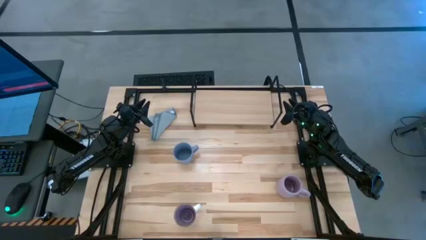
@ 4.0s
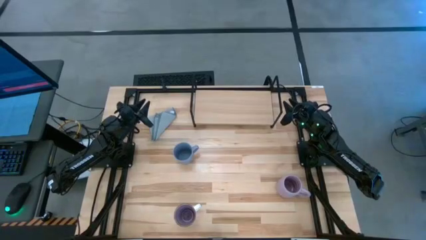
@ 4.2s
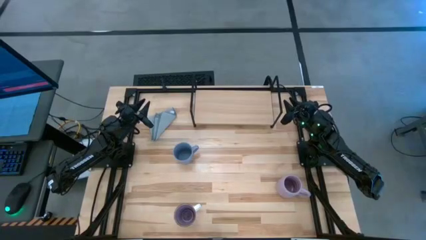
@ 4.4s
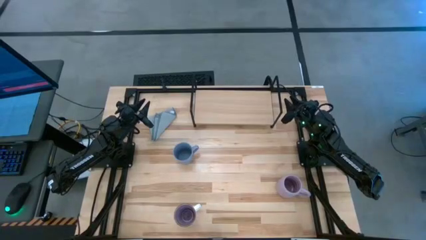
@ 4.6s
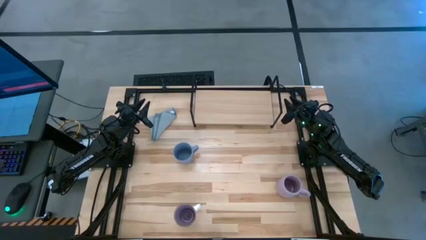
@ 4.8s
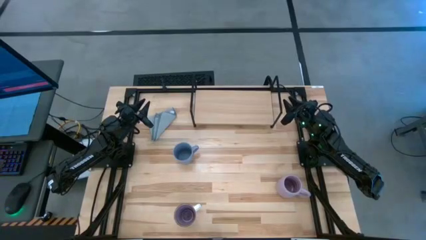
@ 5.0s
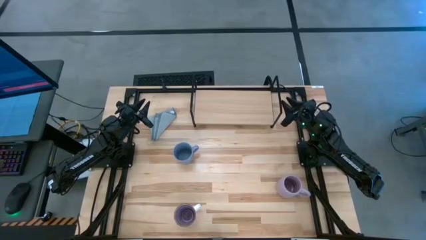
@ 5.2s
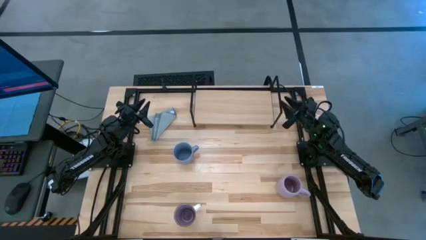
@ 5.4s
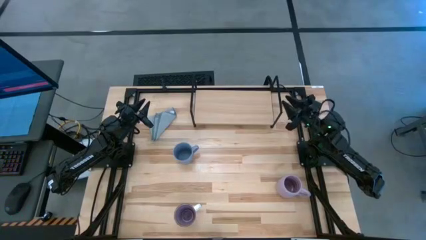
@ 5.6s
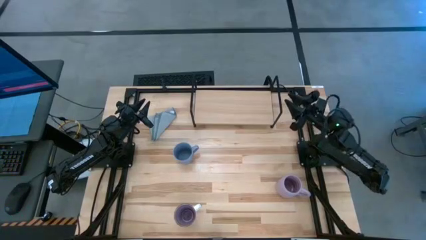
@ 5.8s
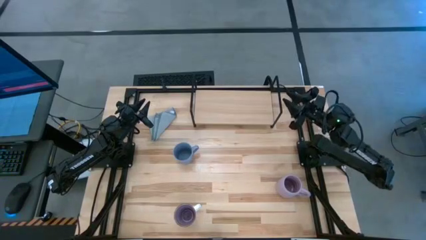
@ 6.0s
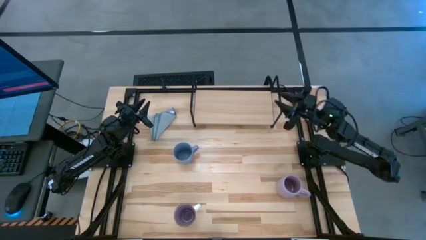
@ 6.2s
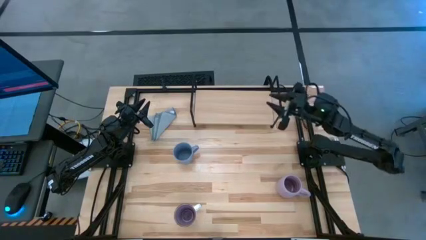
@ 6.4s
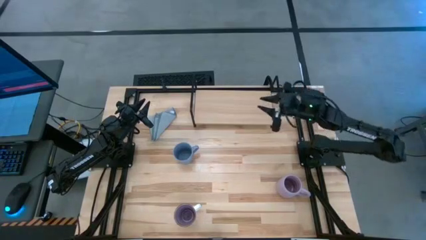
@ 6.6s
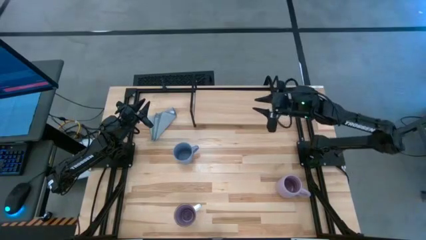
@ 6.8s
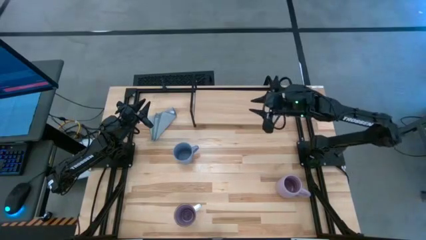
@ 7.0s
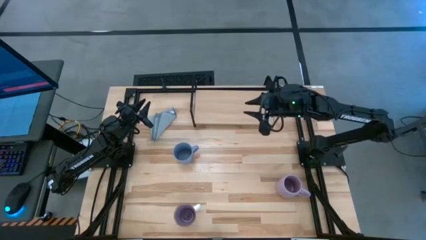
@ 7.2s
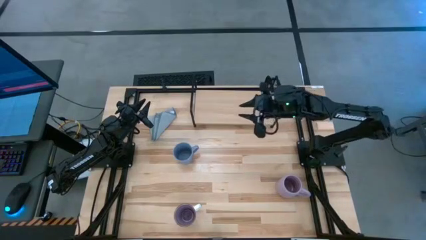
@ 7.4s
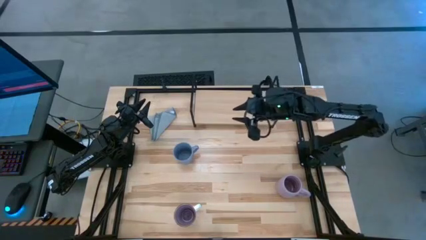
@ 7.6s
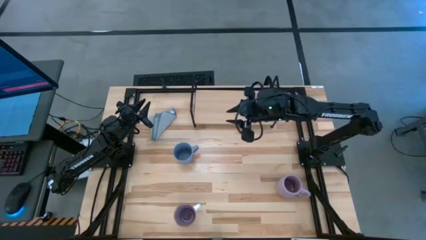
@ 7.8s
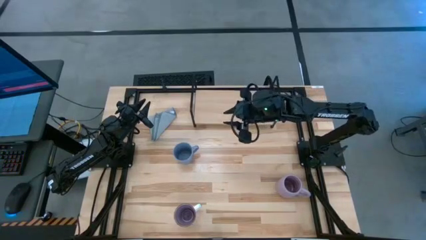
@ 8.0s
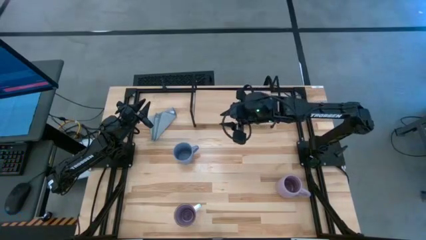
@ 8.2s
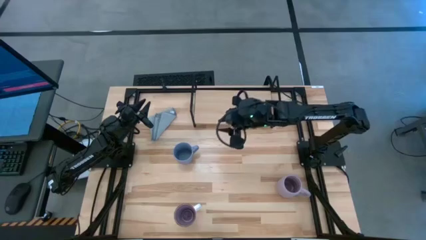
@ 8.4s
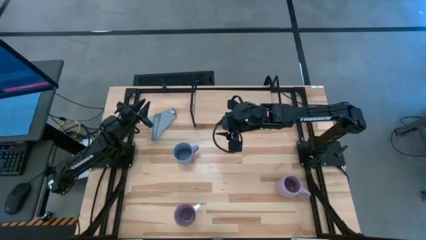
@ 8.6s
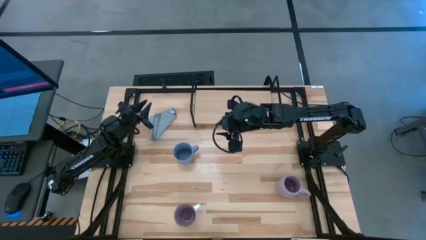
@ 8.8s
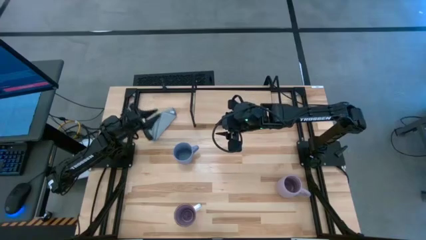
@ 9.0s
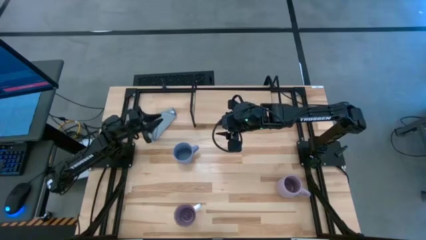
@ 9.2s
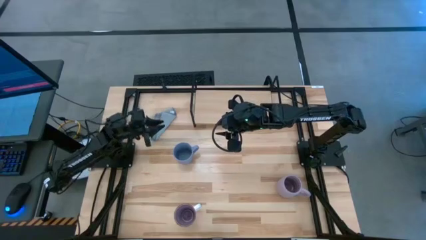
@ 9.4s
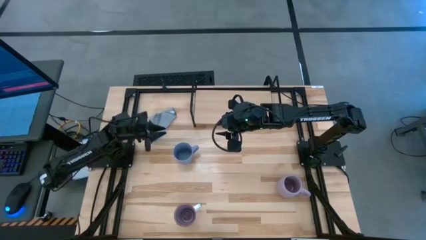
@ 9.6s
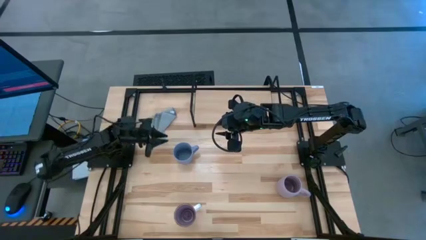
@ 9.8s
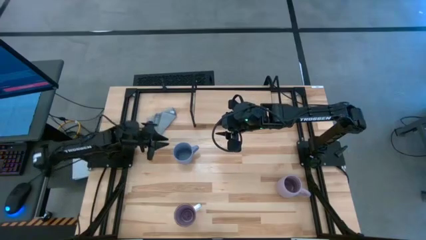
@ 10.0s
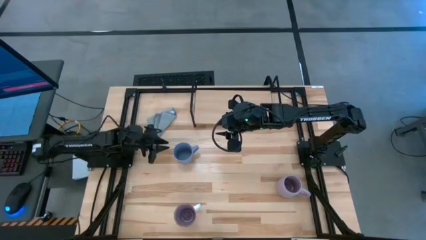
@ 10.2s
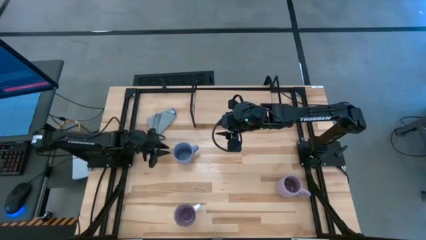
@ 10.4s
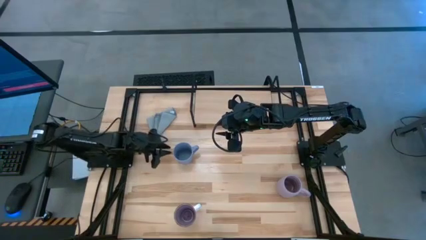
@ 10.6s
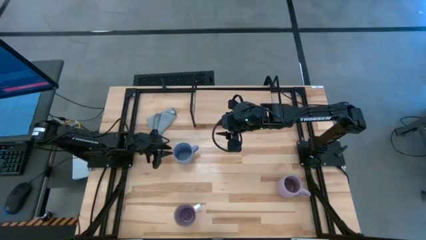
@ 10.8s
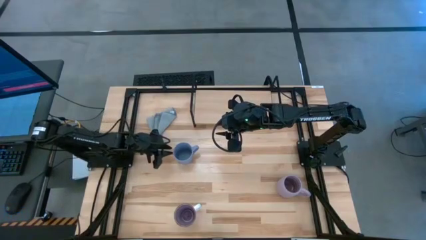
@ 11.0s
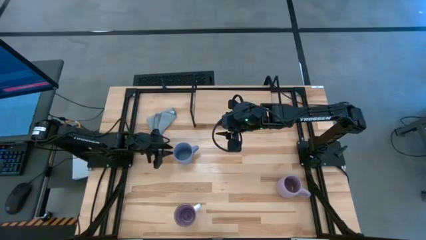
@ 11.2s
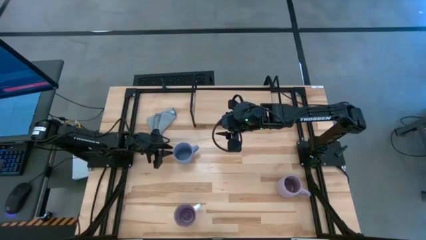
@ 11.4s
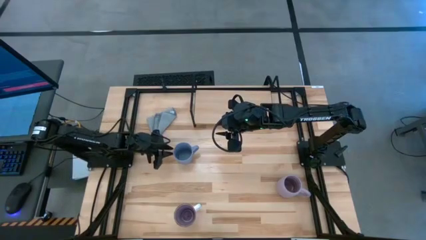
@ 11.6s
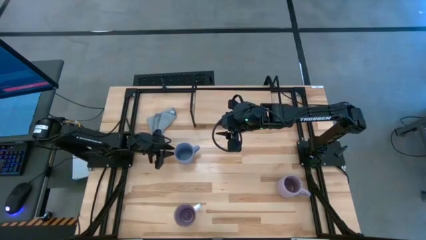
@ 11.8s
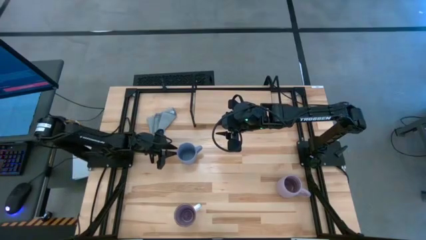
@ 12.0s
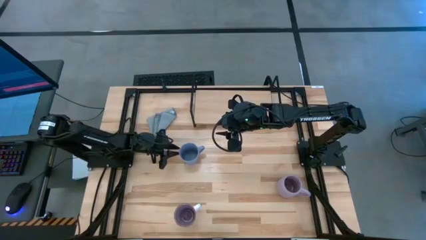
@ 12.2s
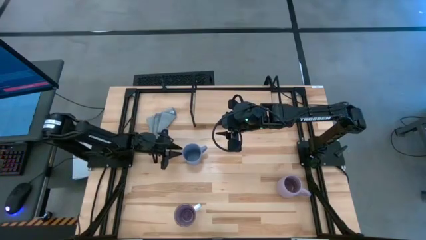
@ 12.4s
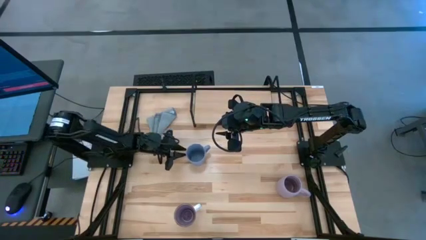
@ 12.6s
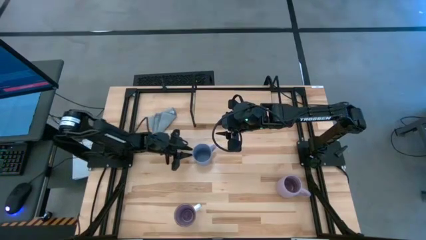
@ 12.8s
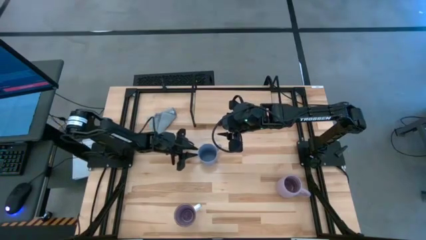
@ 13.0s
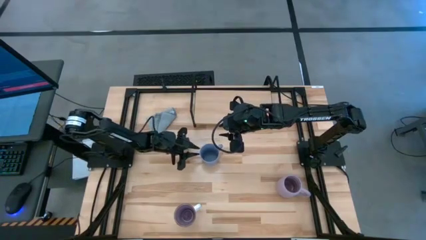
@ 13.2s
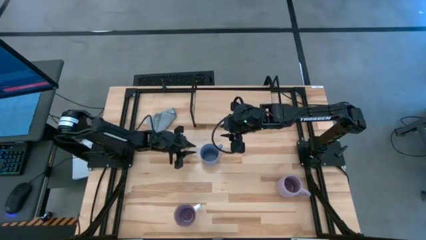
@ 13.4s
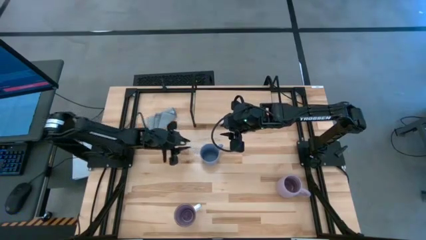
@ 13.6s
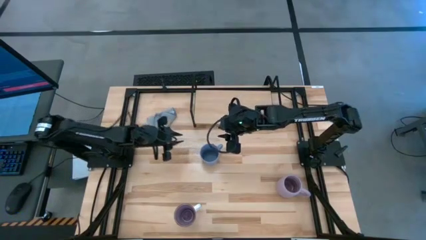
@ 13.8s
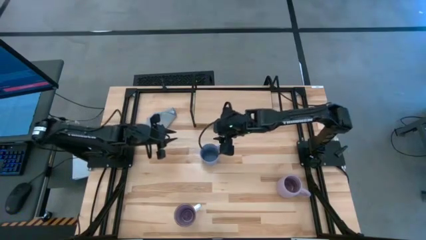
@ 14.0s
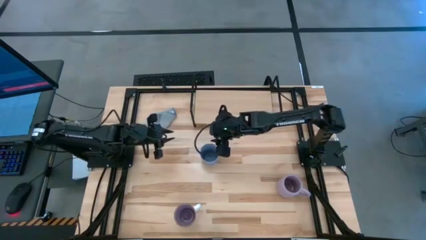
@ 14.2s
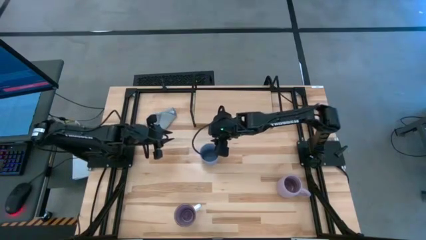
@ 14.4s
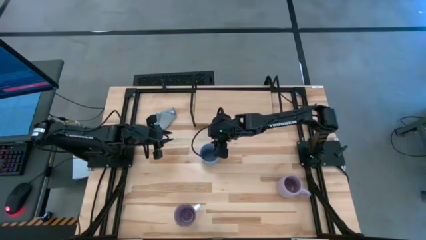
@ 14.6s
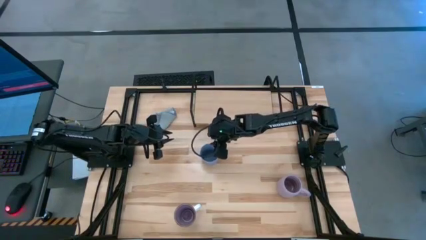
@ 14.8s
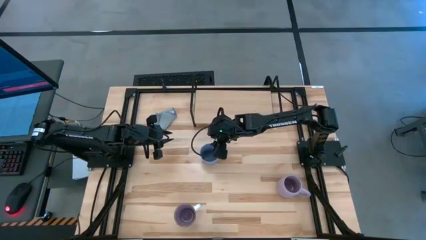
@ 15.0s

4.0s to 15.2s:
Task: Stack small to large cups/mugs on shelf
Put the blue cup on the shelf

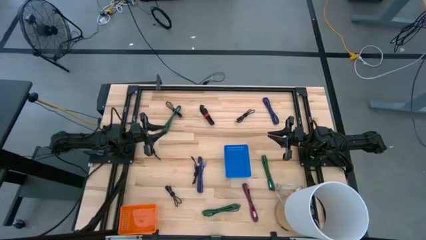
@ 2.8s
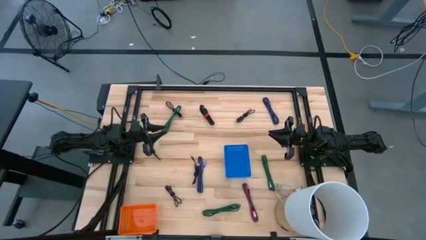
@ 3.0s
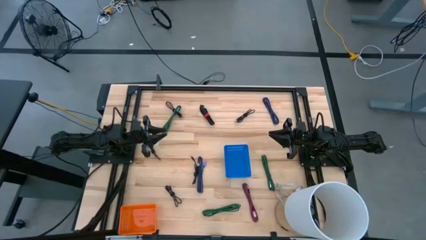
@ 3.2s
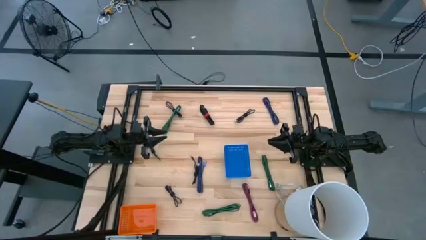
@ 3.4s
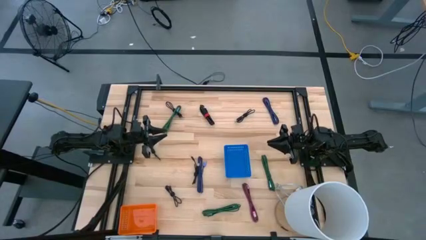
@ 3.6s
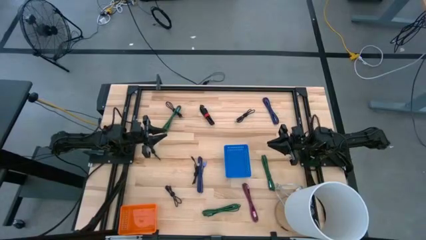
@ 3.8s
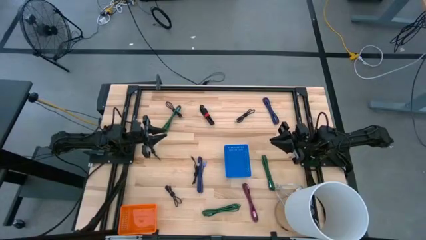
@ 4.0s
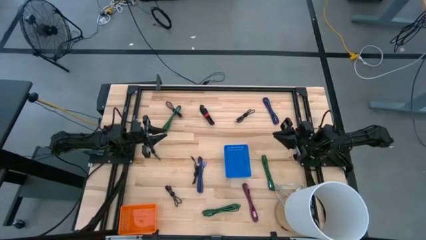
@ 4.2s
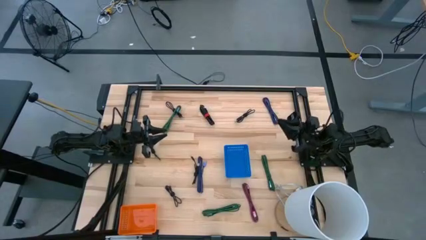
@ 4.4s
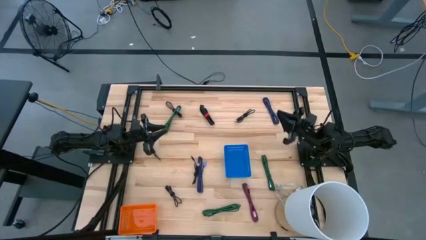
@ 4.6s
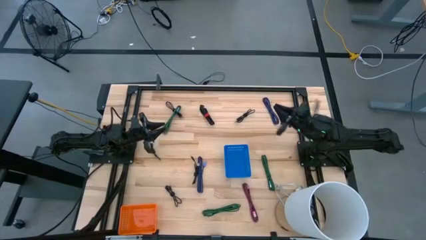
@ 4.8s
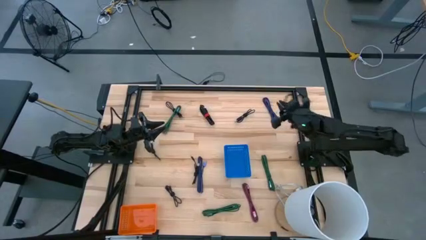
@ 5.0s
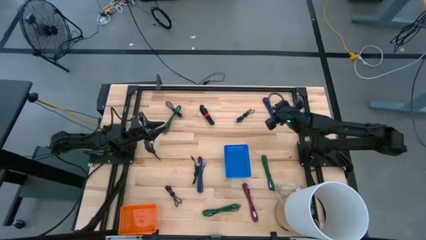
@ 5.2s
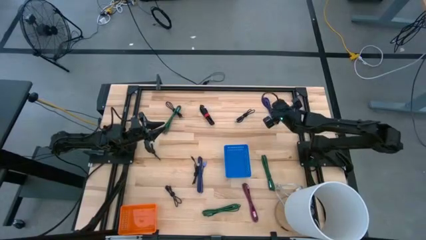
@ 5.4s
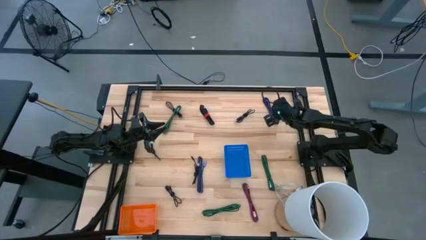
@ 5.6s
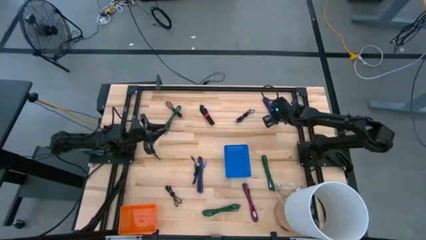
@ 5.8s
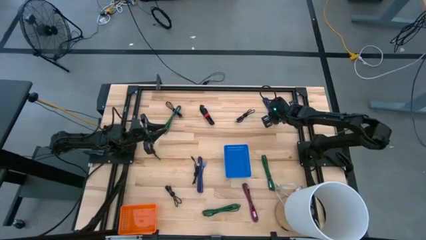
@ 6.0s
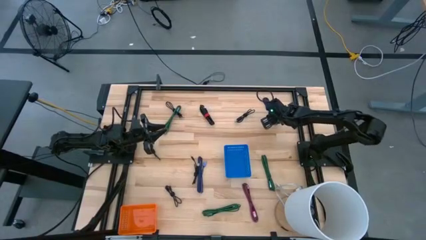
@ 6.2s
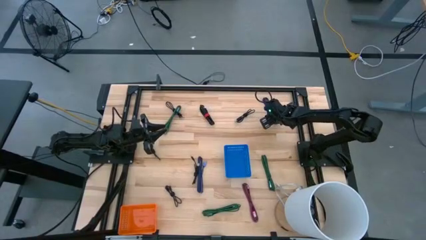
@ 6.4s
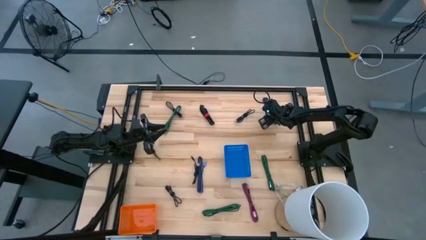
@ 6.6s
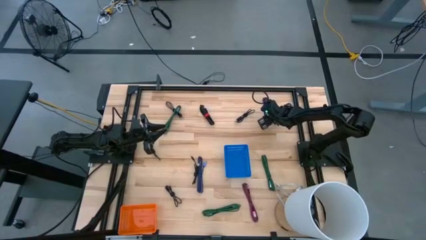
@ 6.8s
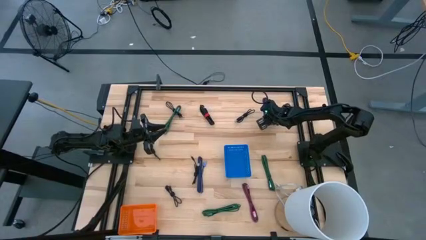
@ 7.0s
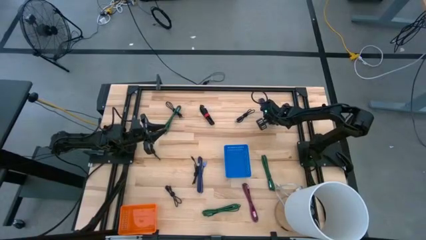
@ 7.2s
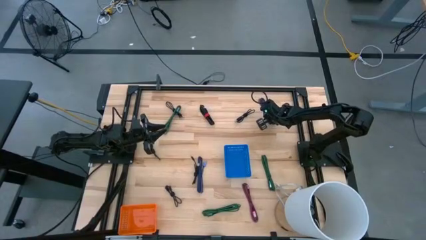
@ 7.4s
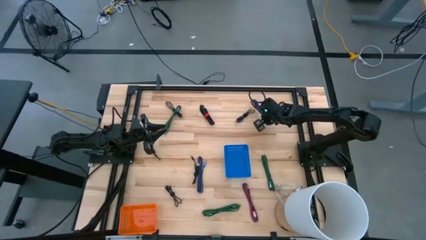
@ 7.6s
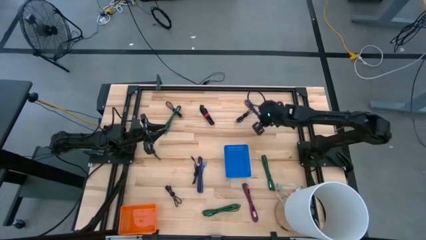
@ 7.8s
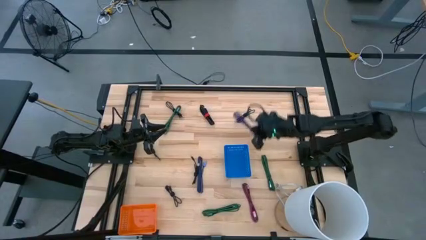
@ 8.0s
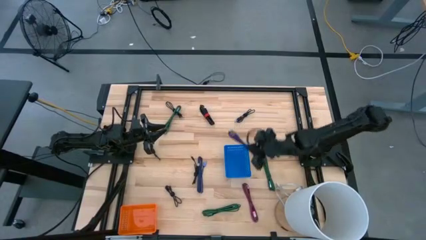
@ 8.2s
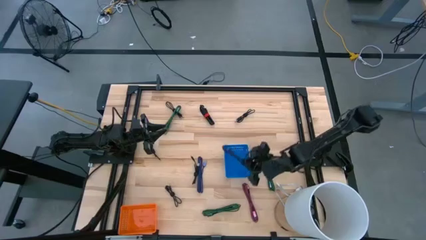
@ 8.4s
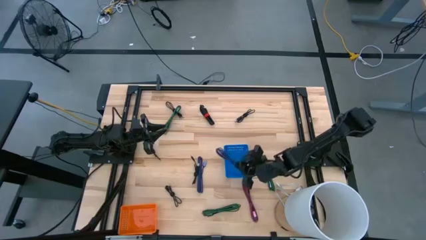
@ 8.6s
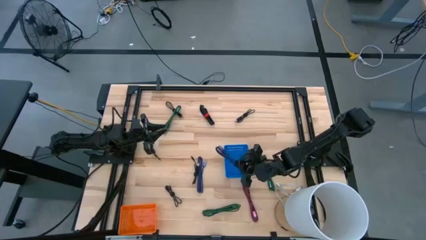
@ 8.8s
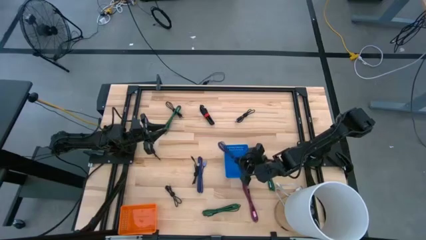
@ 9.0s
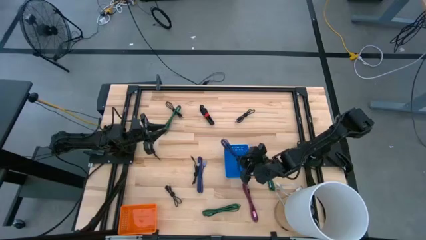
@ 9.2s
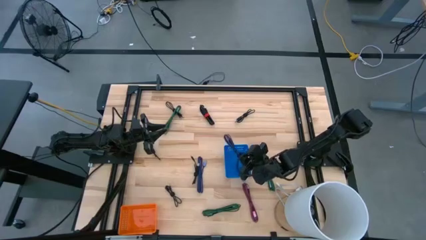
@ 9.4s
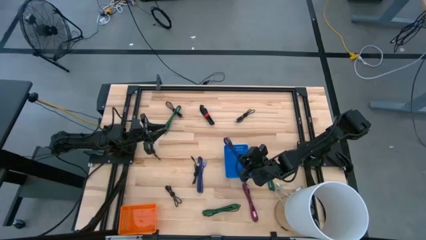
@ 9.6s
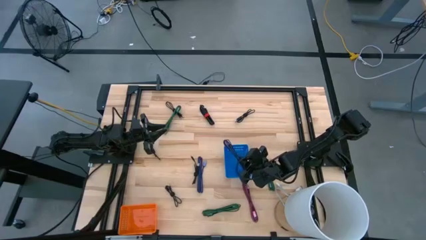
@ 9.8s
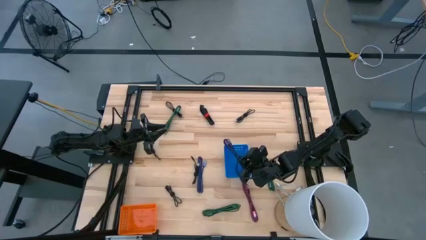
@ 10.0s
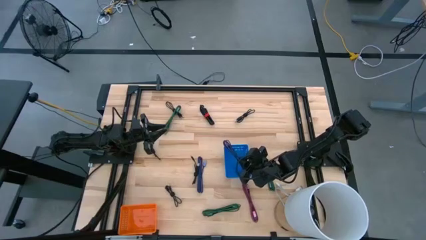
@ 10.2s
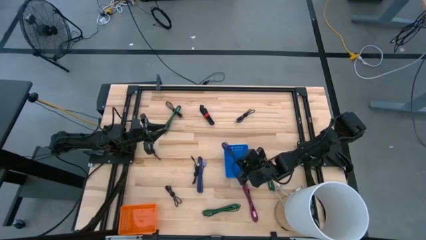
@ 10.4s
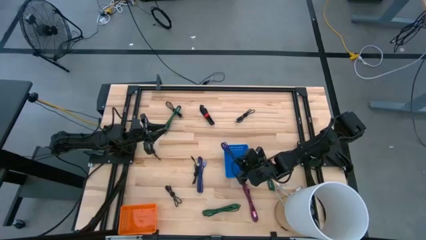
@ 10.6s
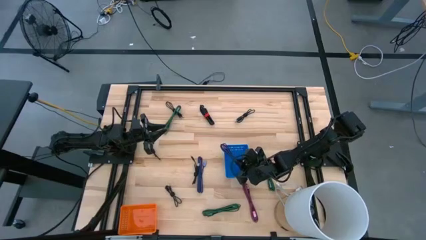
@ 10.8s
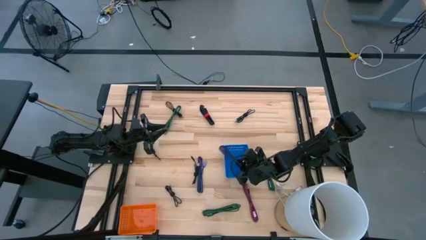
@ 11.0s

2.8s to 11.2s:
Task: Pick & Place USB Port
Put the black and purple charger cable into the blue bin
